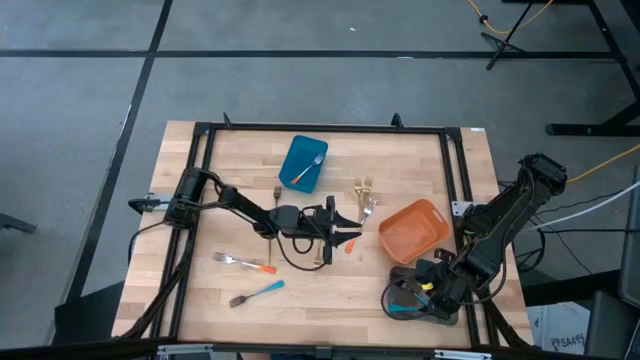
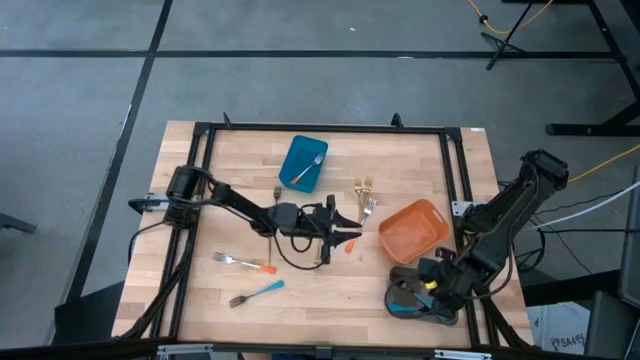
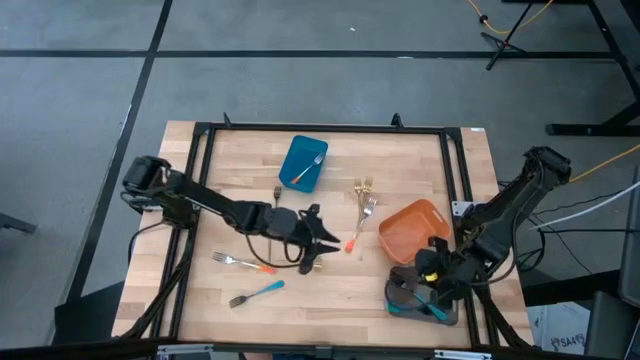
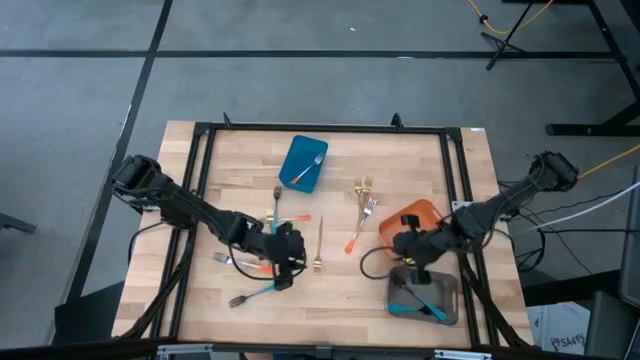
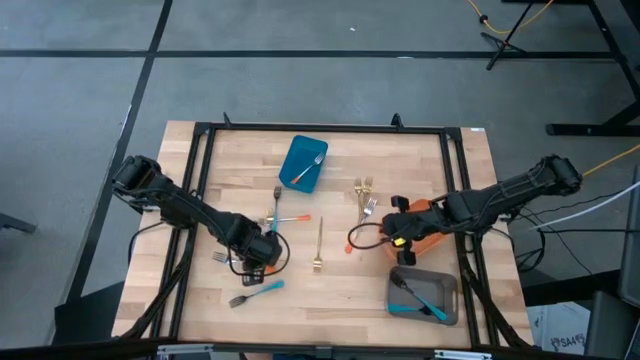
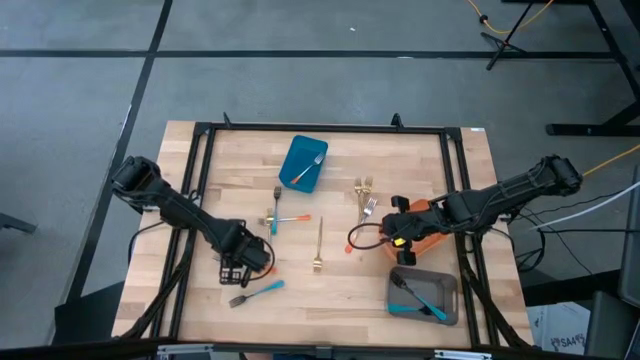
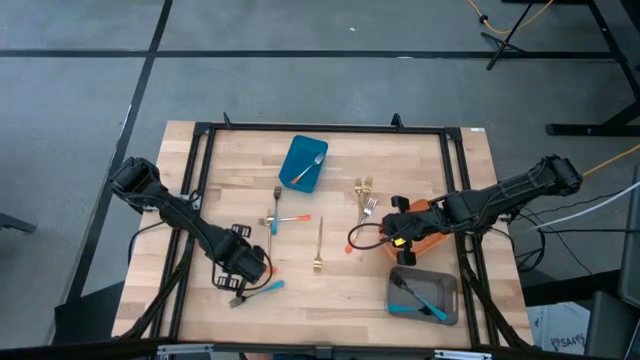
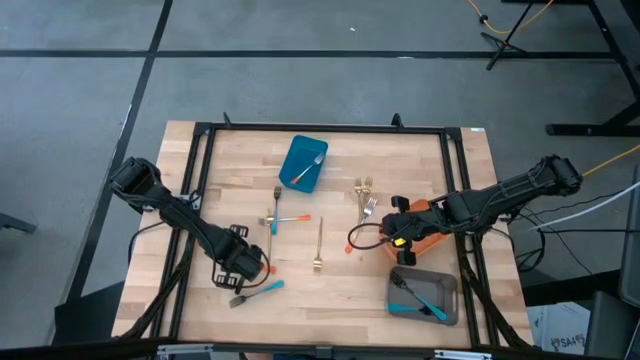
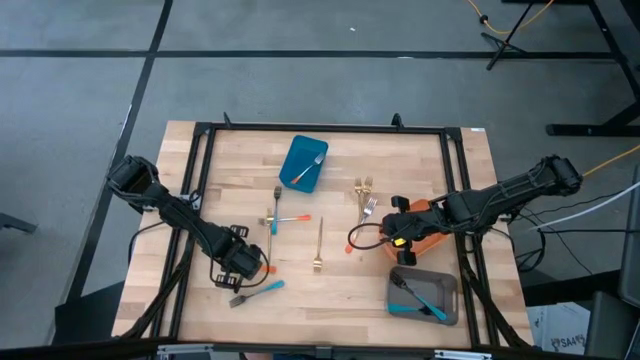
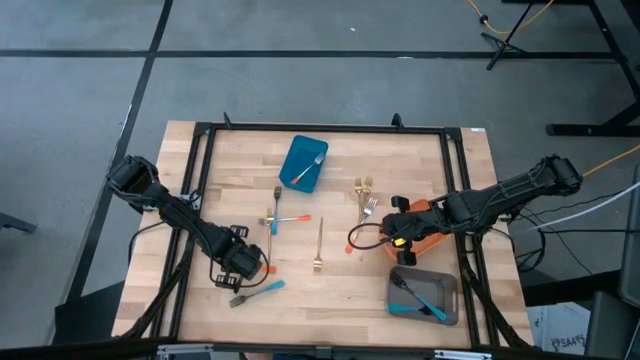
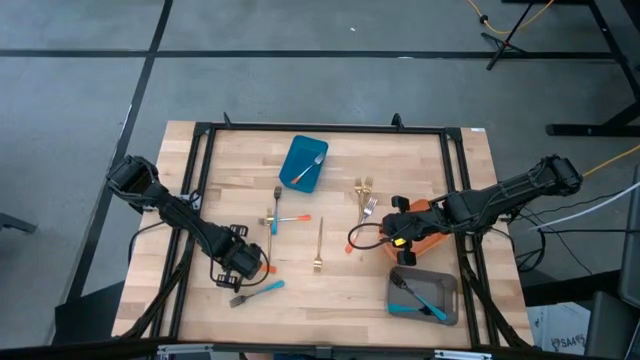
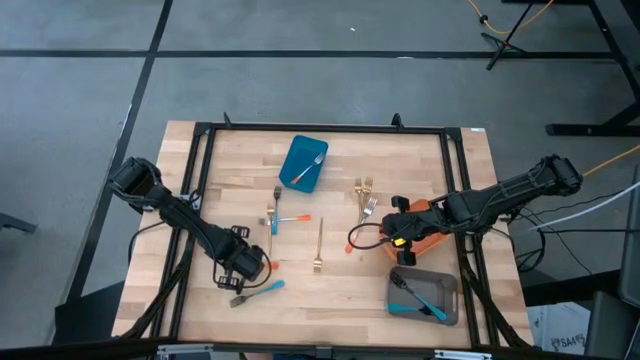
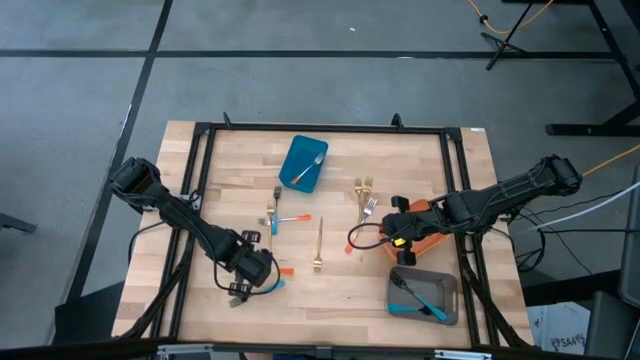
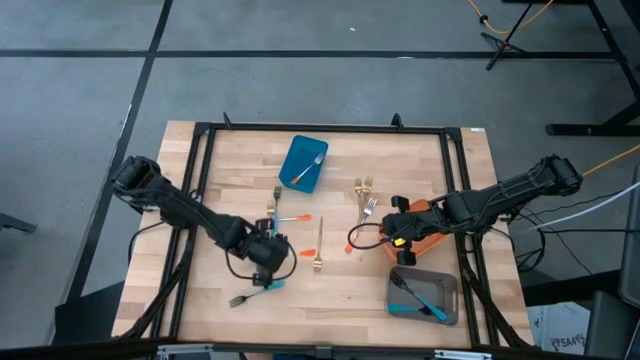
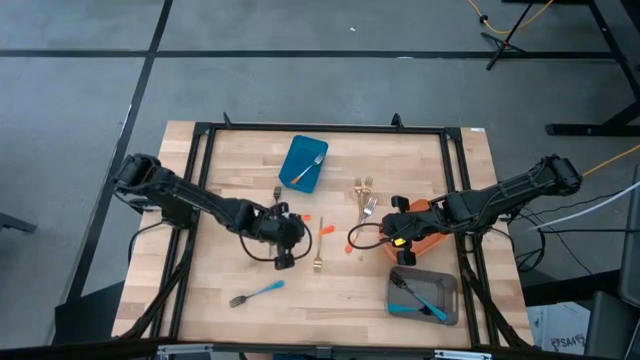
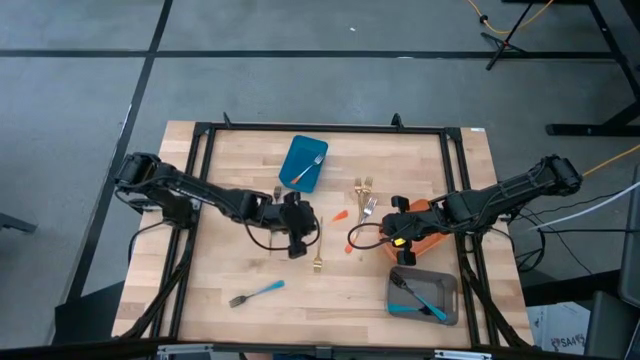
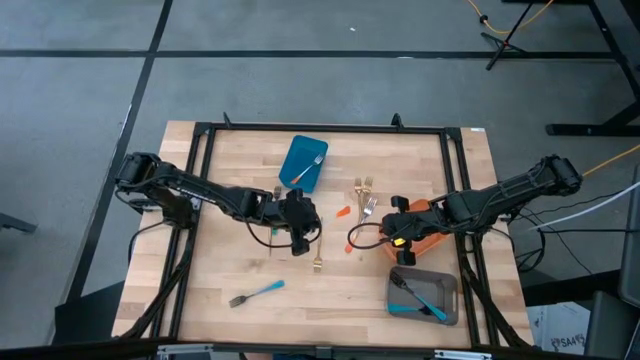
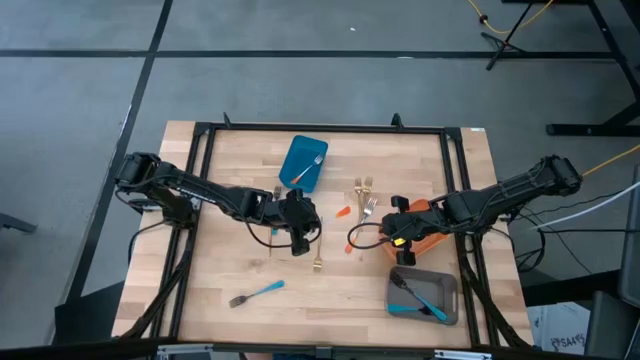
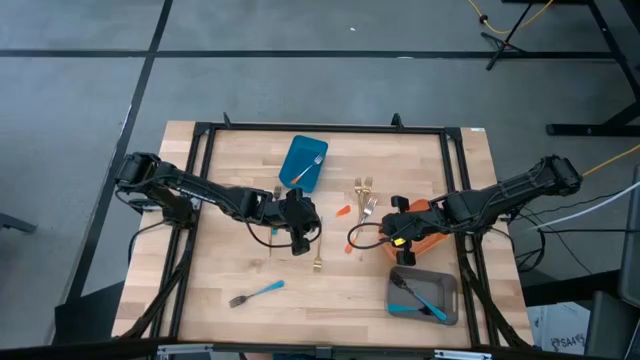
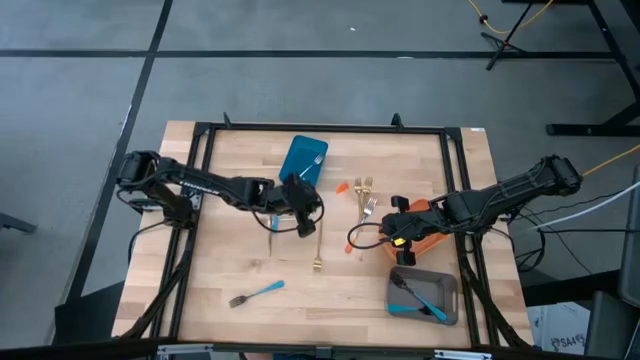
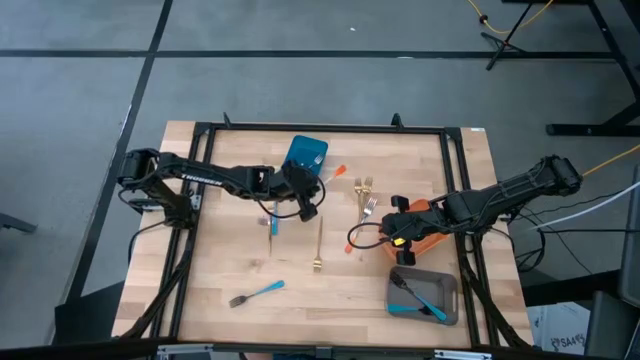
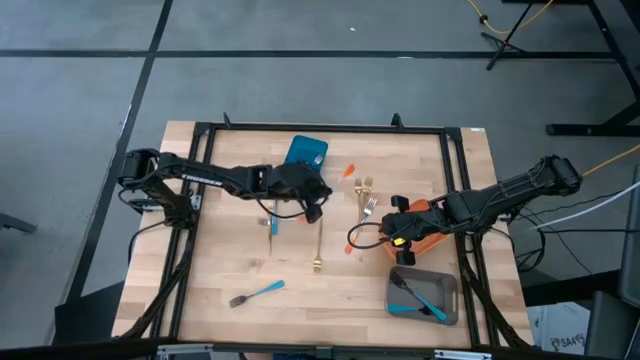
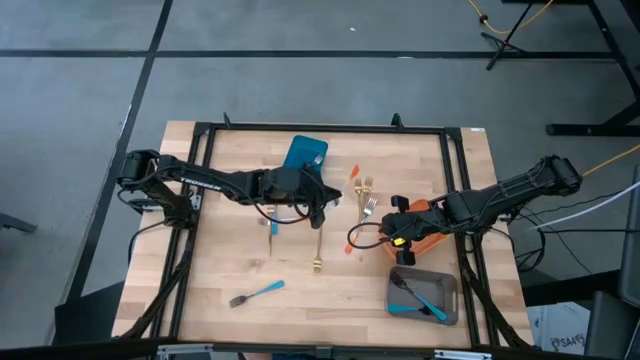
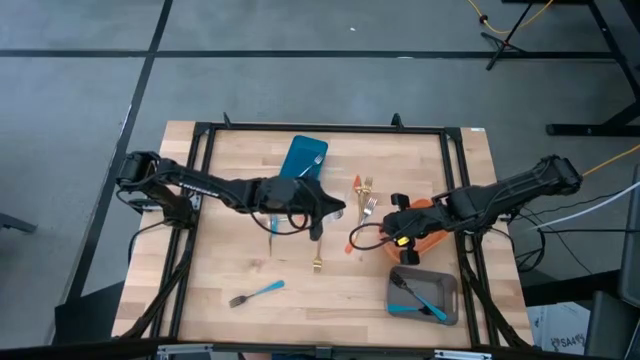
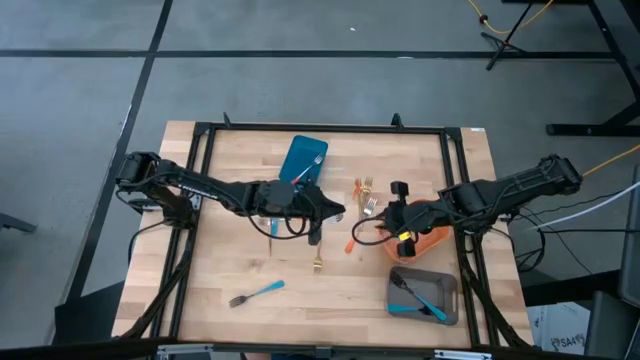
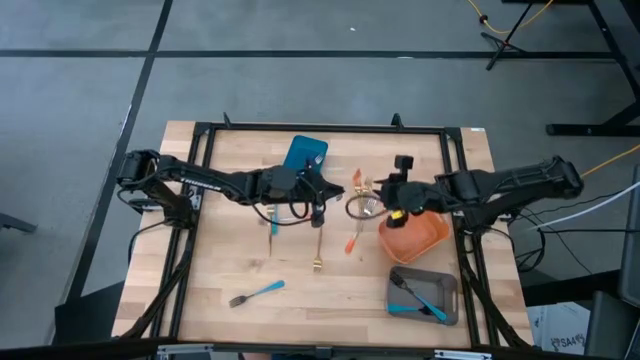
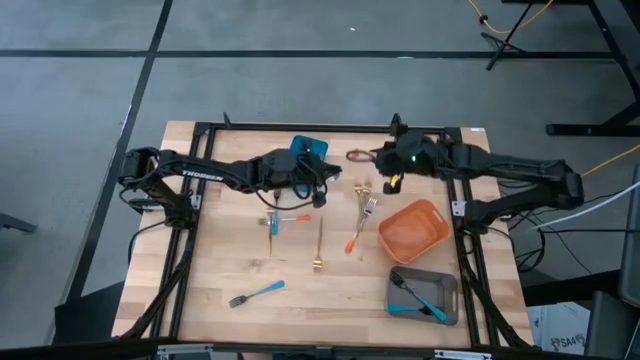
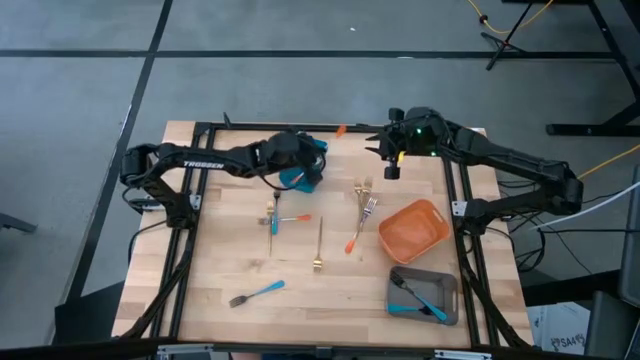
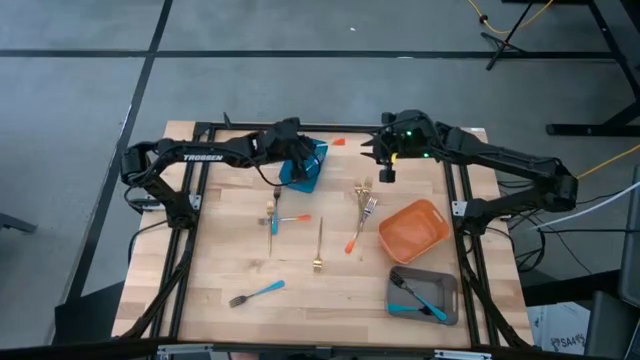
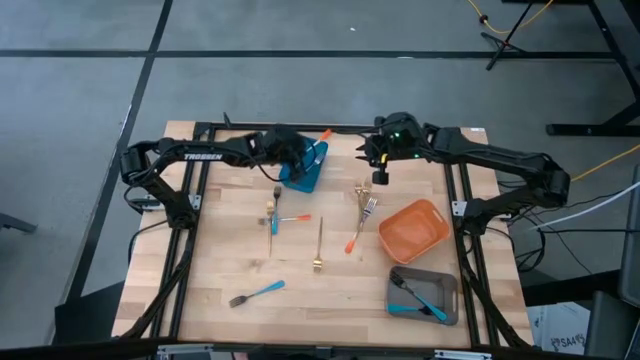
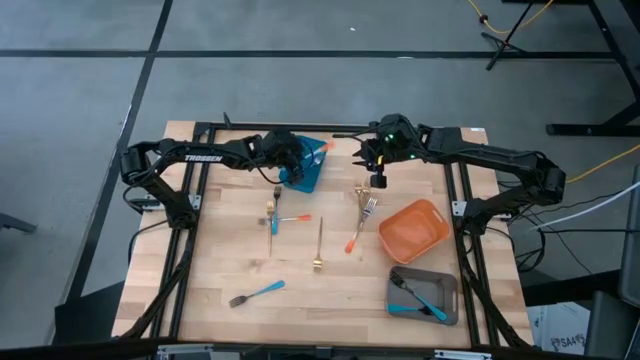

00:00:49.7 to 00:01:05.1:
Task: Sort silverware by color (type)
Put the bottom orange fork into the blue bin

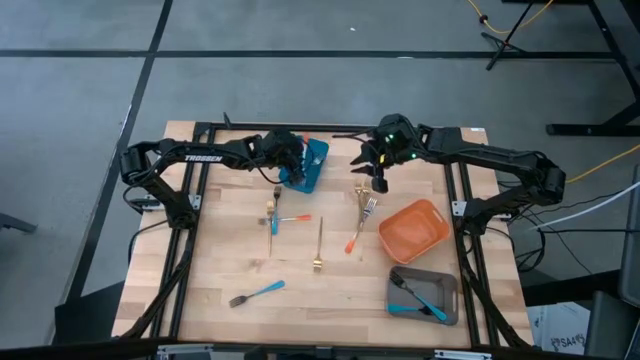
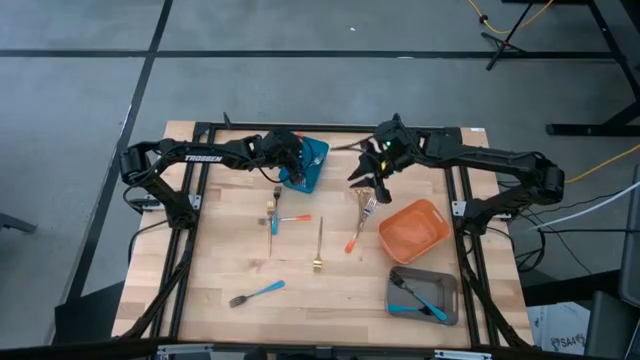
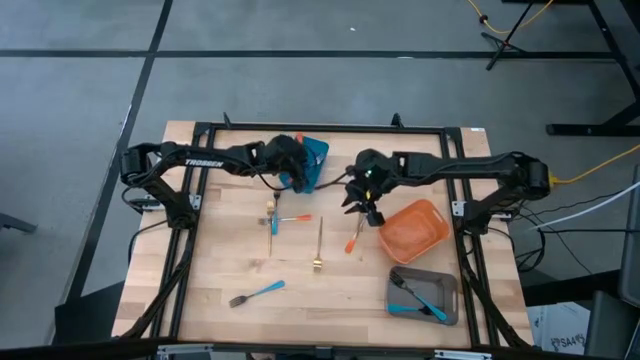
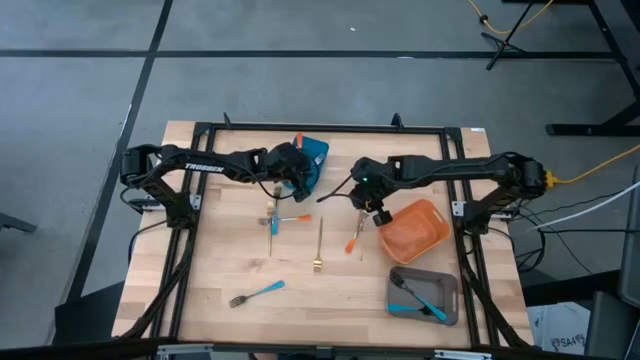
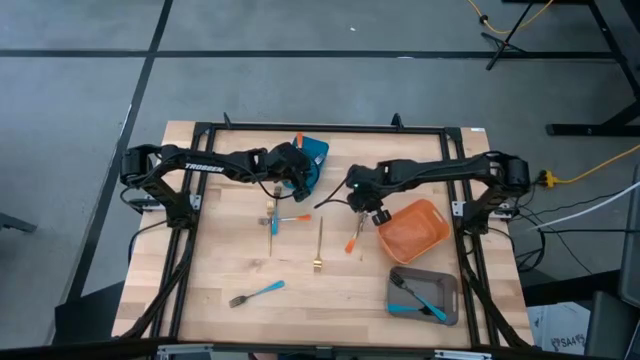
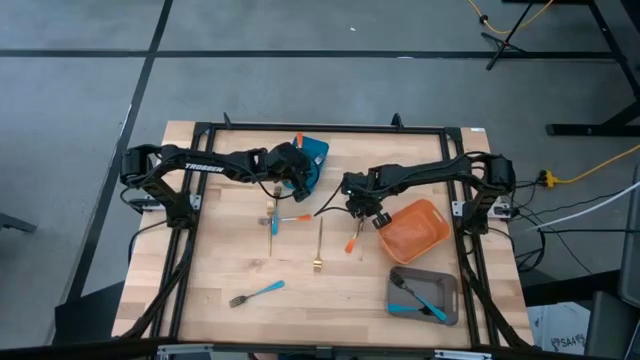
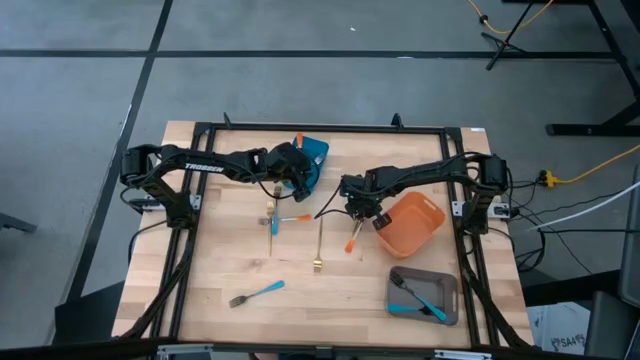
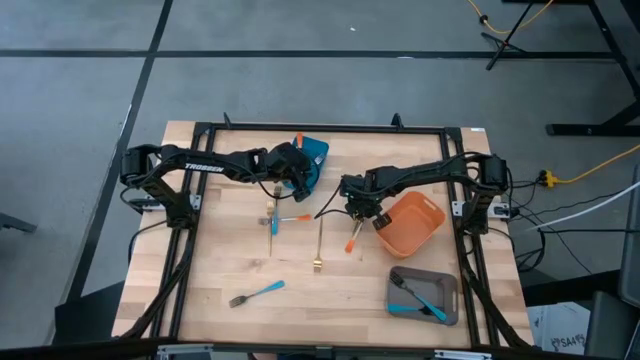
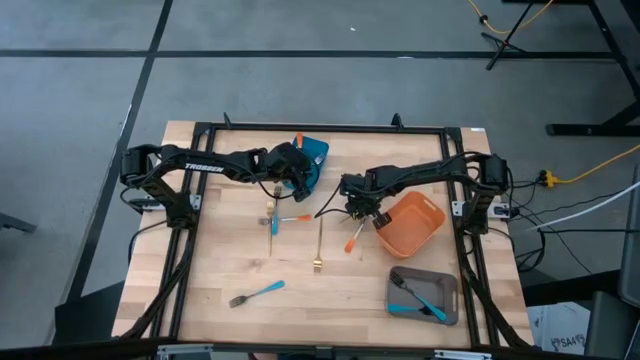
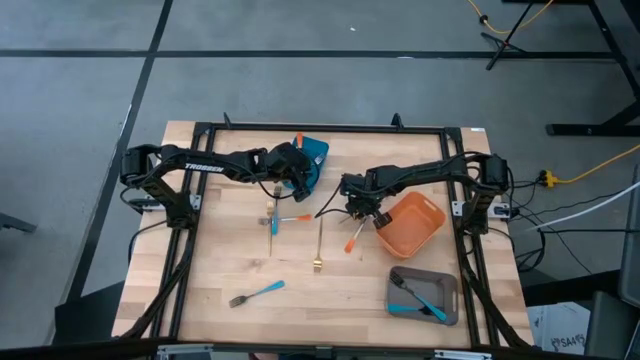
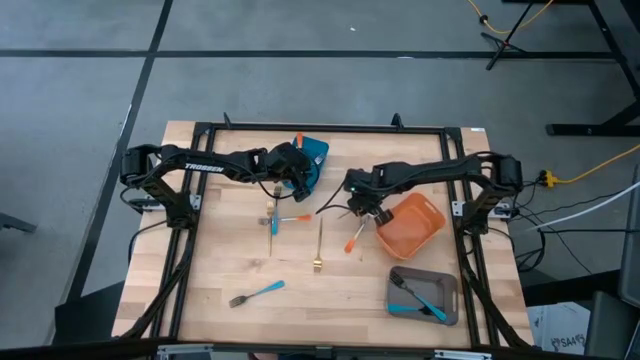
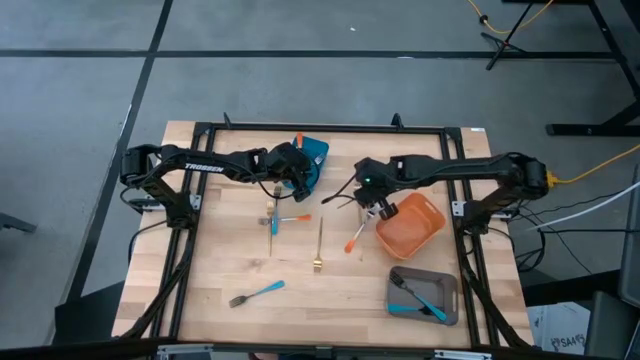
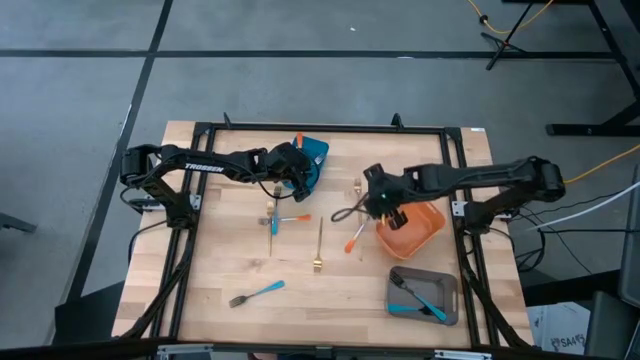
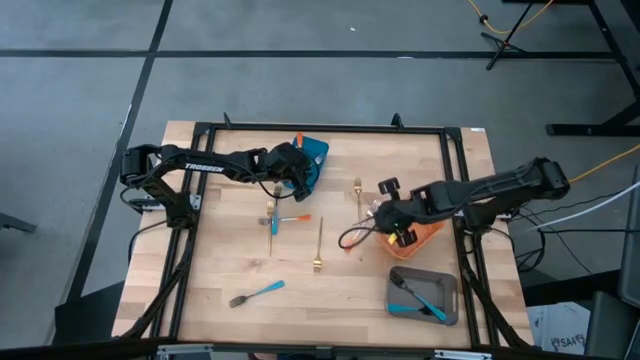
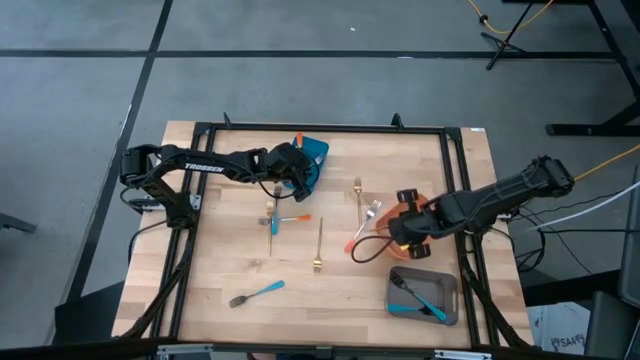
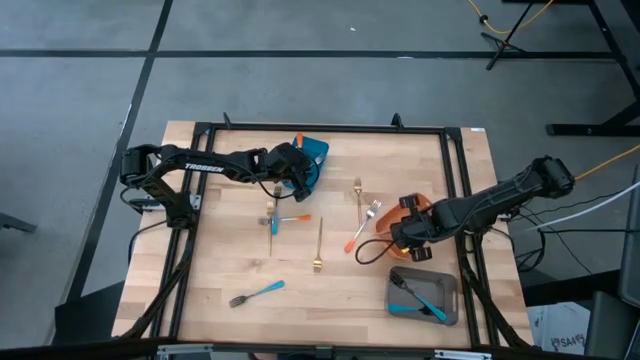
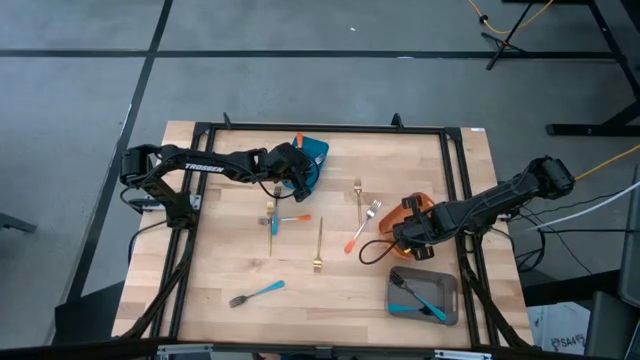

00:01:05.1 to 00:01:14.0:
Put the middle right gold fork into the orange bin
